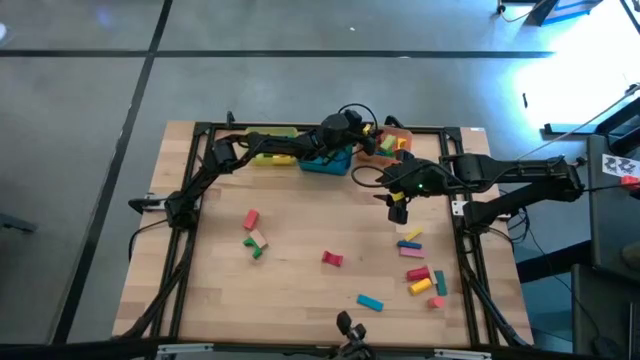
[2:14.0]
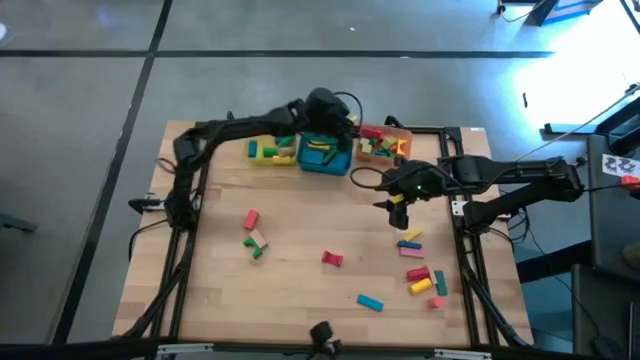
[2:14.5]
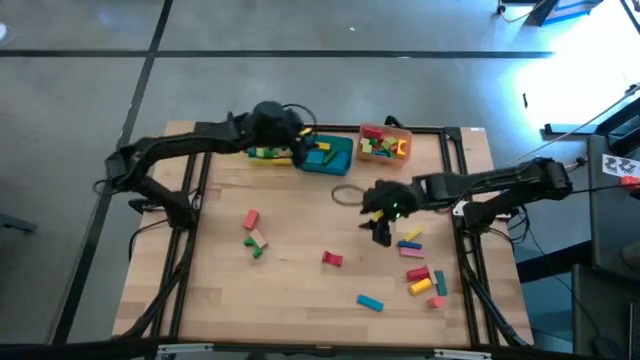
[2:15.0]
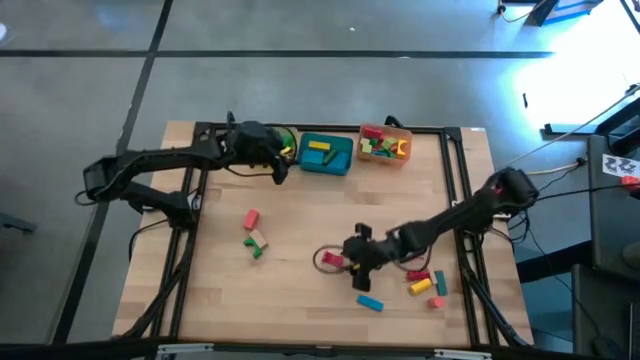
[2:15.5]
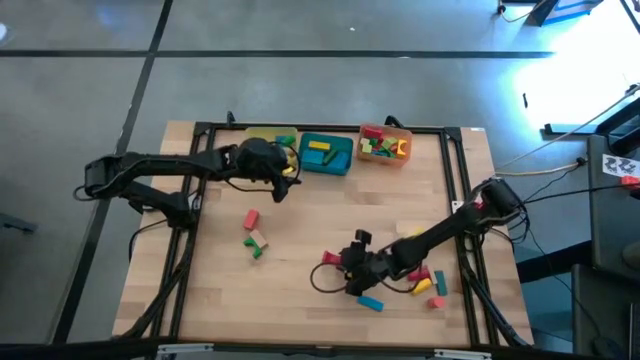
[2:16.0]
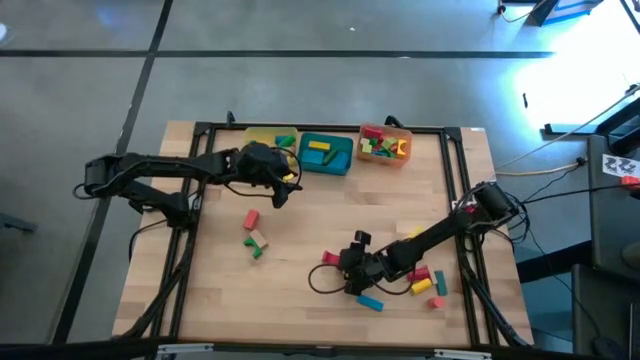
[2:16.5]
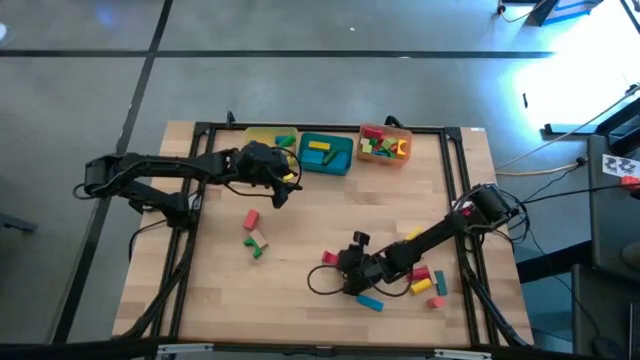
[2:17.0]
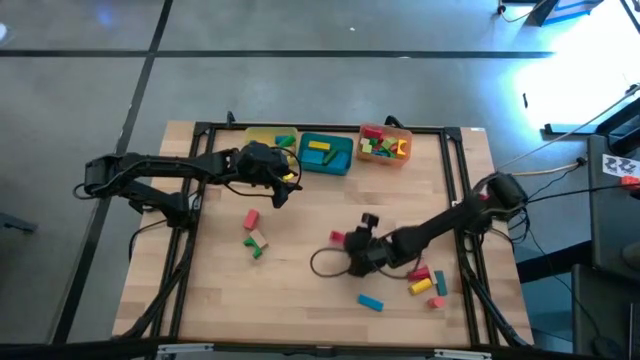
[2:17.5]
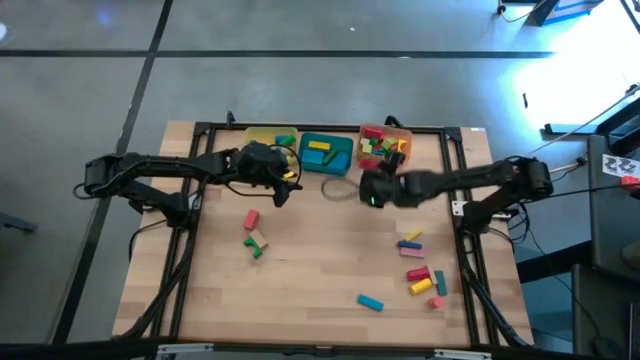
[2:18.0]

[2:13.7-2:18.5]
Task: Sort blocks by size
Put the red arch block into the orange bin

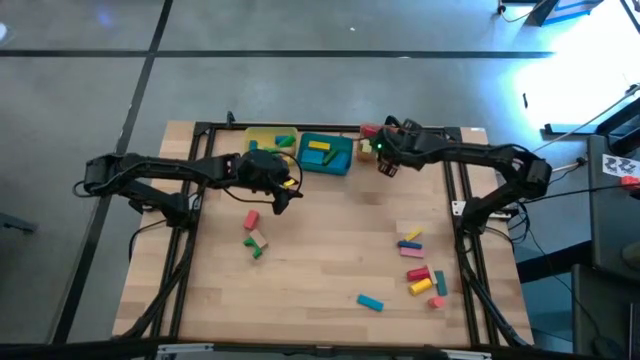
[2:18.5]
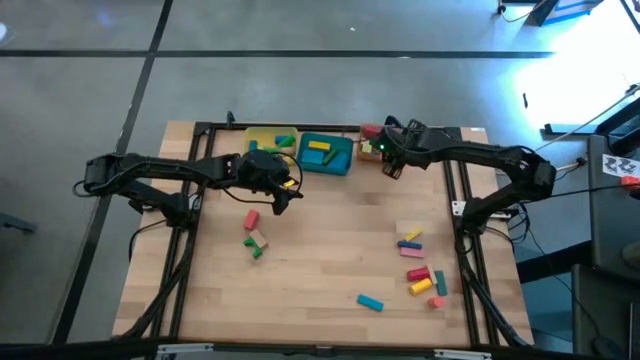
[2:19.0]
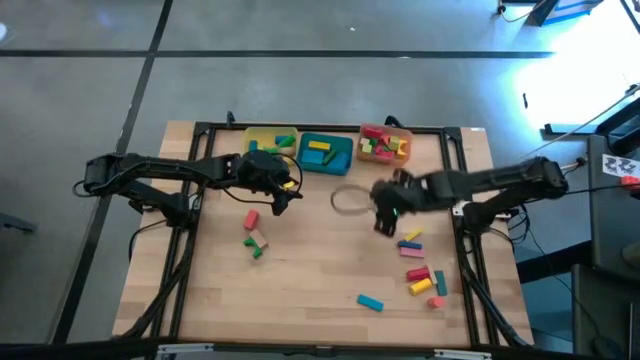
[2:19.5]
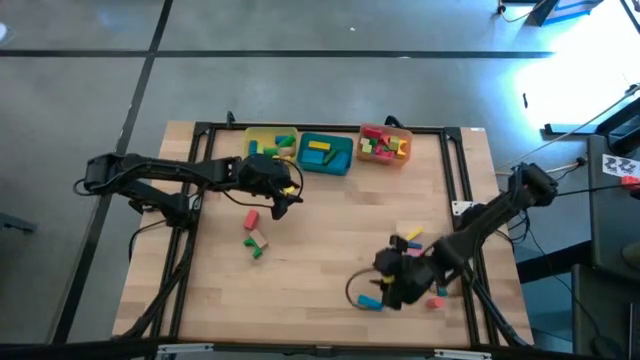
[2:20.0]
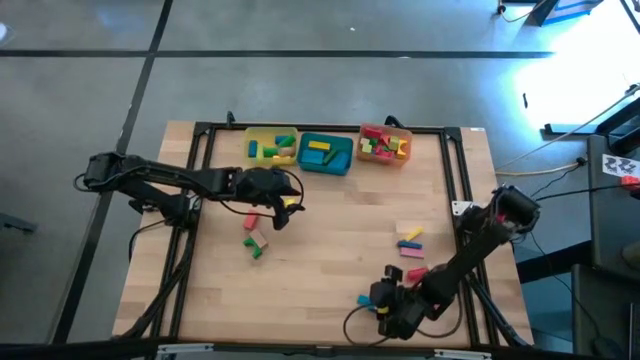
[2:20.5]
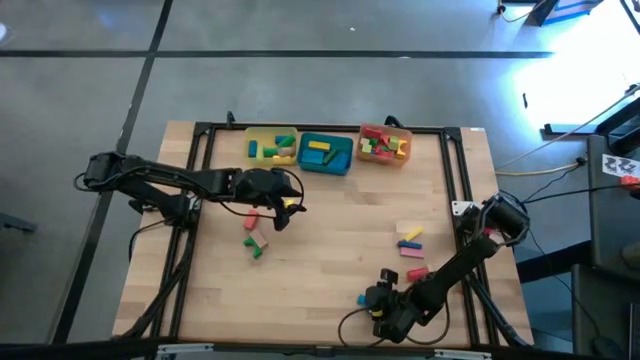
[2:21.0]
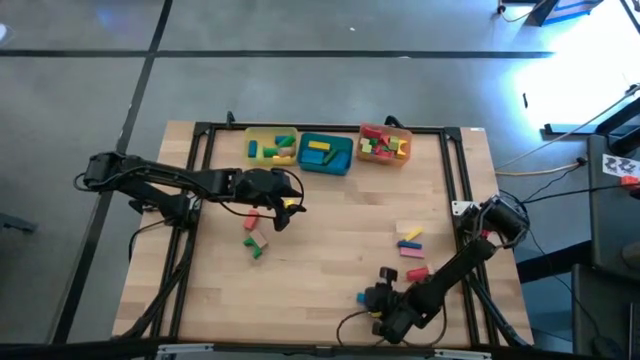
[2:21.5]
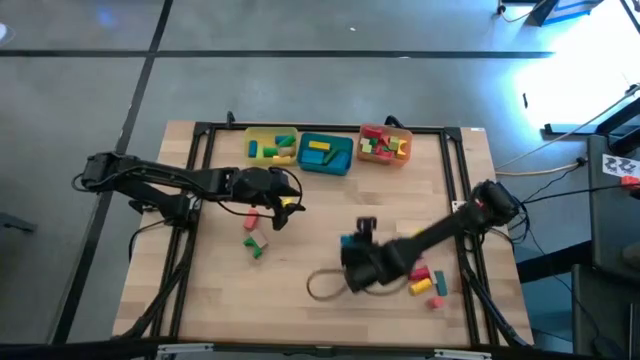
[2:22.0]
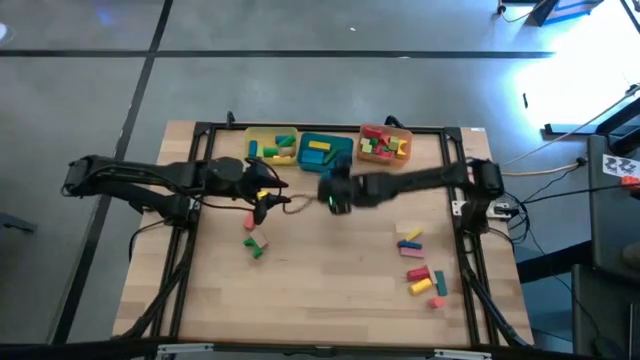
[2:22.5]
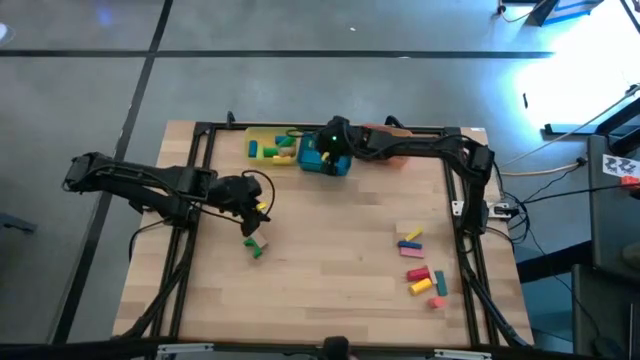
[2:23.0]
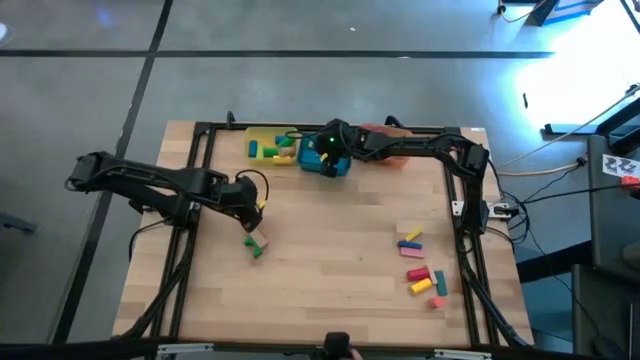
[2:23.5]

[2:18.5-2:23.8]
Put the blue rectangle block into the blue bin

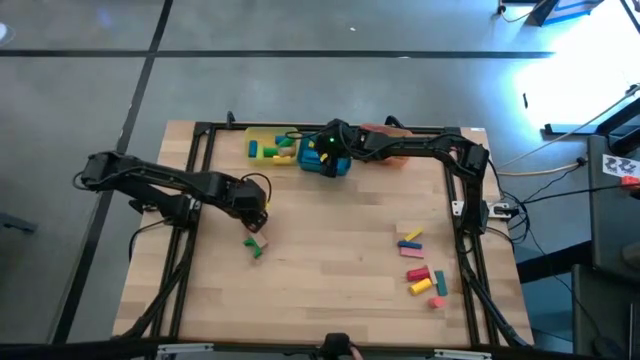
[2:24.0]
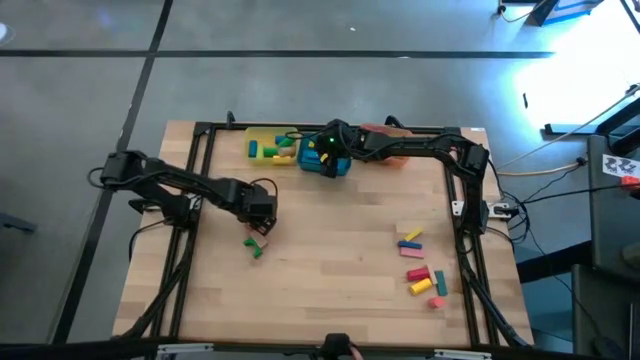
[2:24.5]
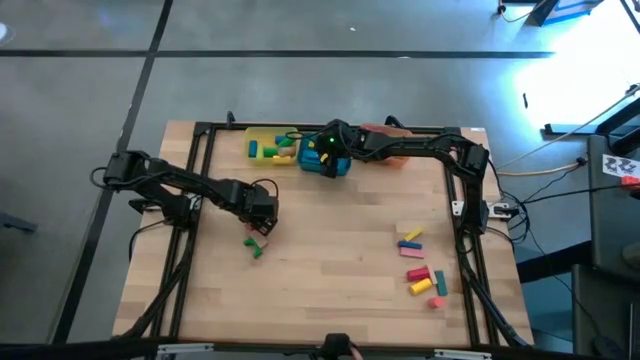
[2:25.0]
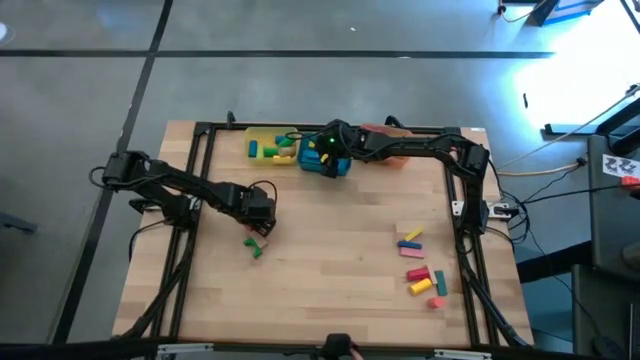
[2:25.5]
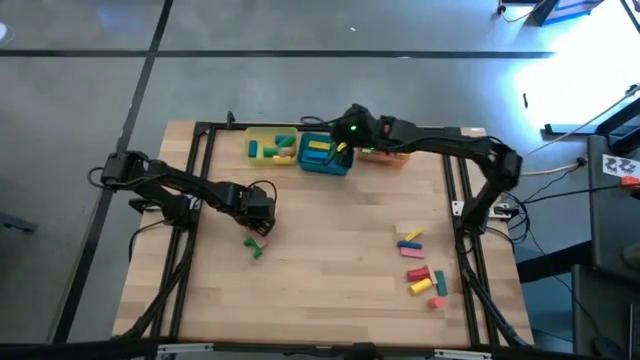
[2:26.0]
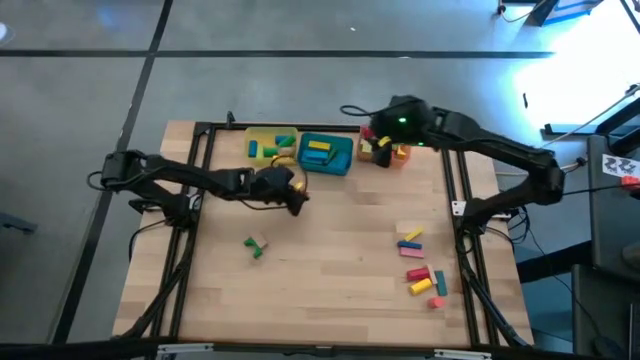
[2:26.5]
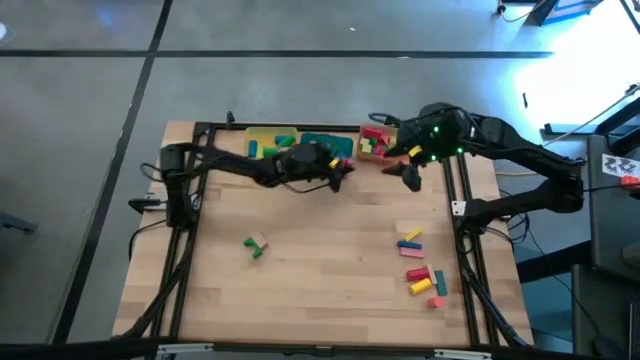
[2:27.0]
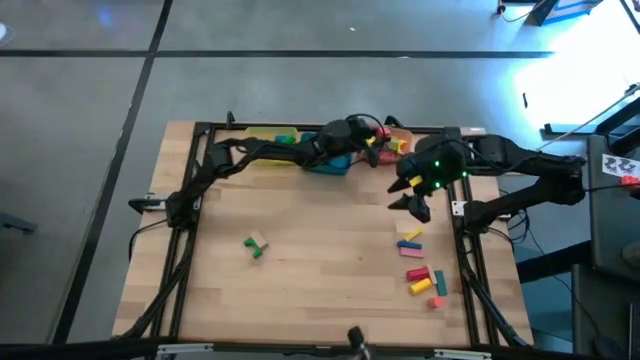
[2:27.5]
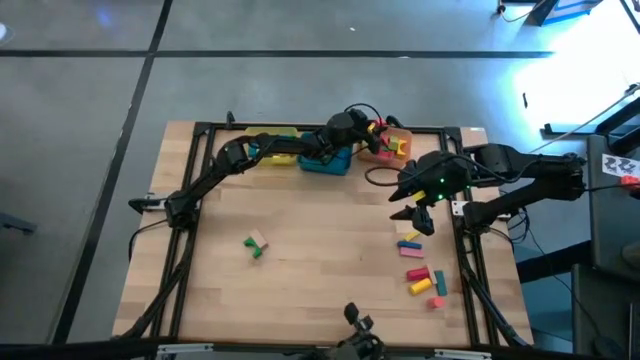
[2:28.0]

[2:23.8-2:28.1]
Put the orange arch block into the orange bin

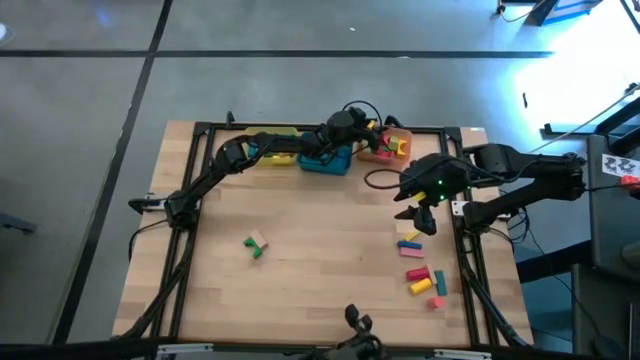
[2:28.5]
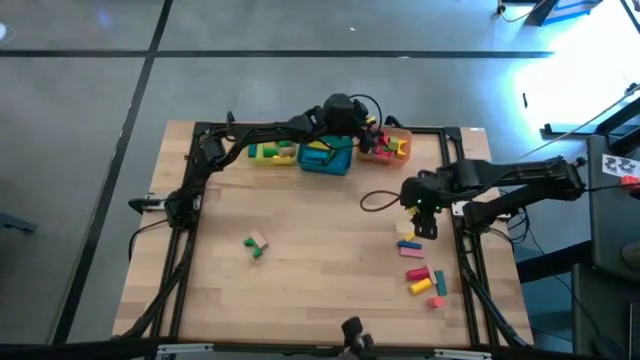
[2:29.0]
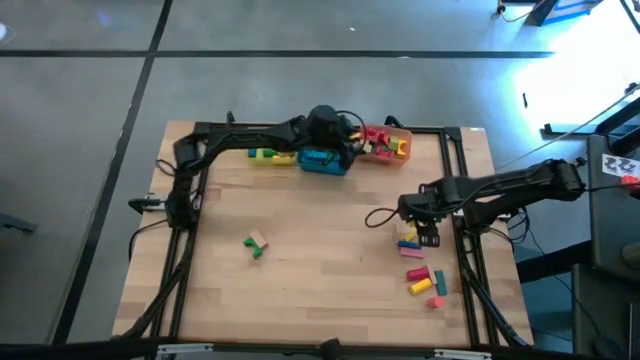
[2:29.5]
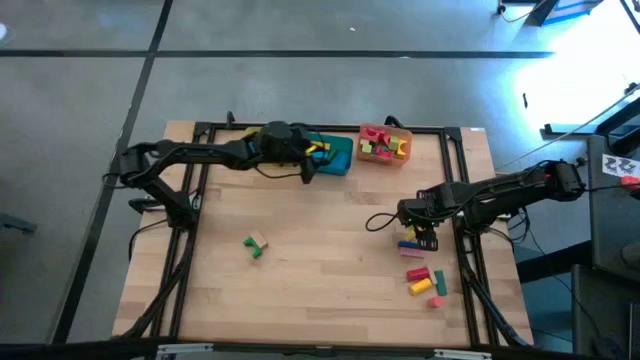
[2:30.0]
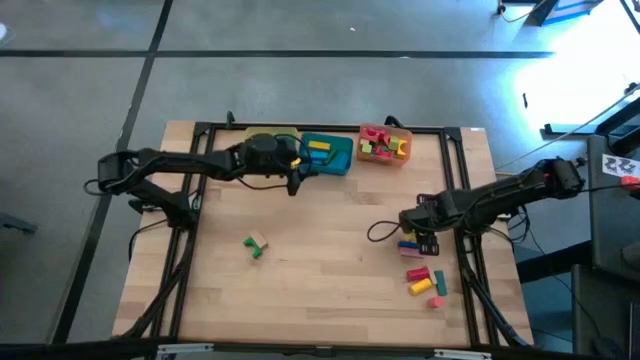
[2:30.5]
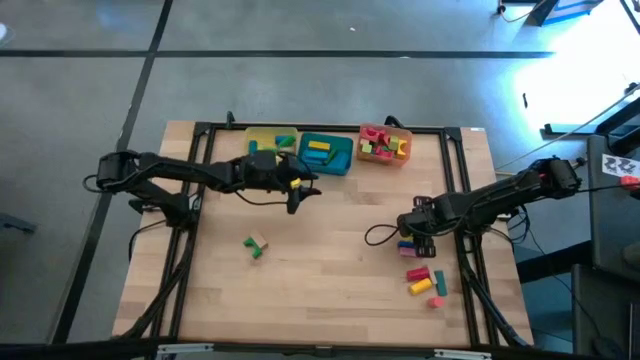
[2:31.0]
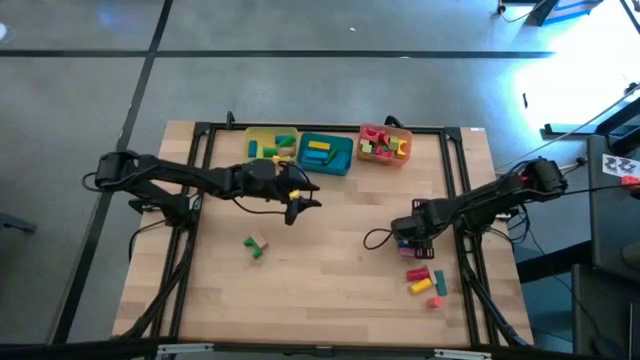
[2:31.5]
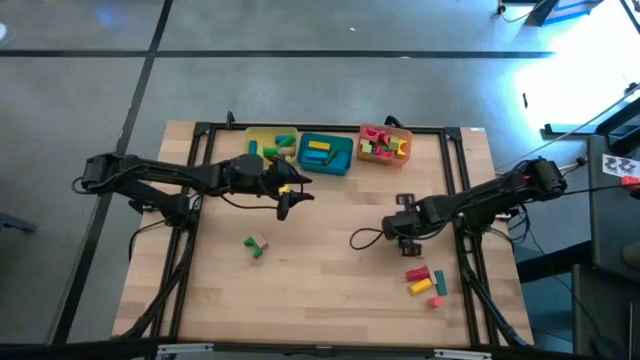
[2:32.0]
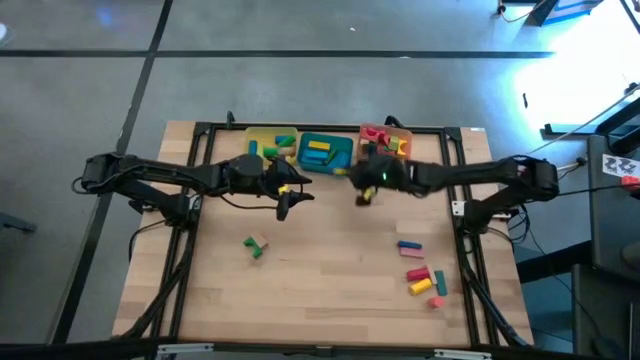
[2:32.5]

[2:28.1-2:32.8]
Put the yellow rectangle block into the blue bin

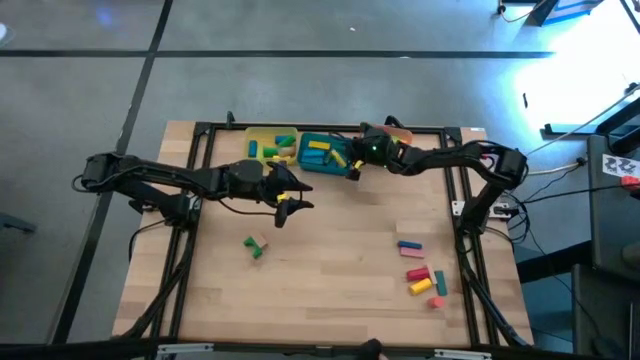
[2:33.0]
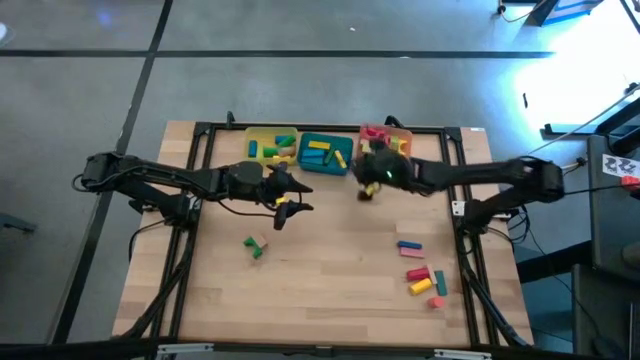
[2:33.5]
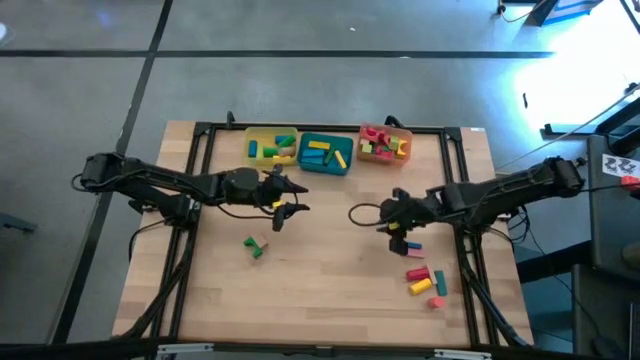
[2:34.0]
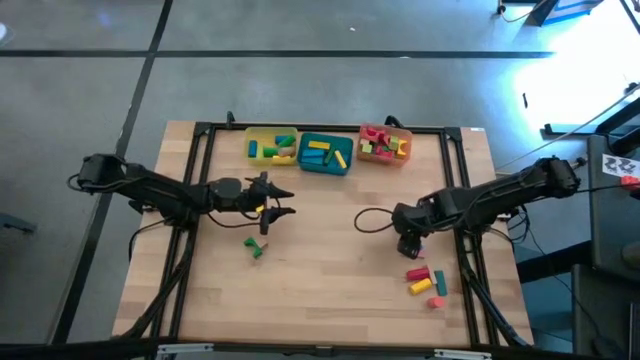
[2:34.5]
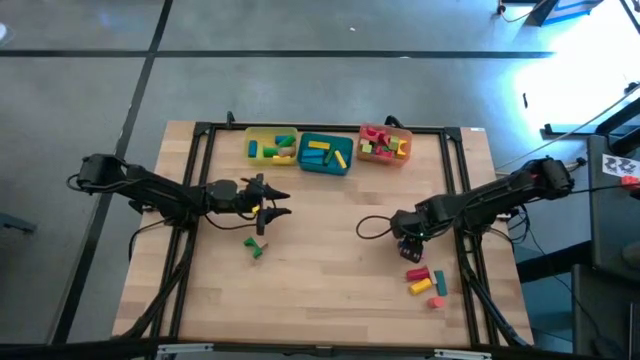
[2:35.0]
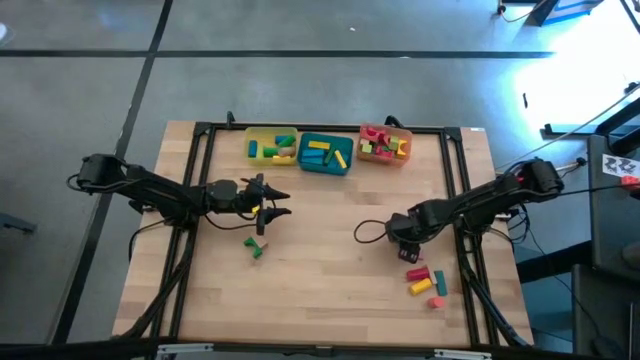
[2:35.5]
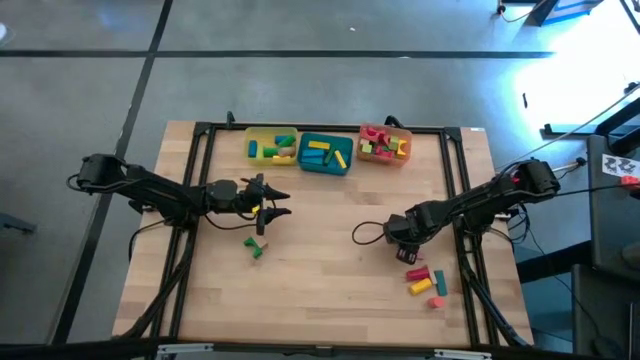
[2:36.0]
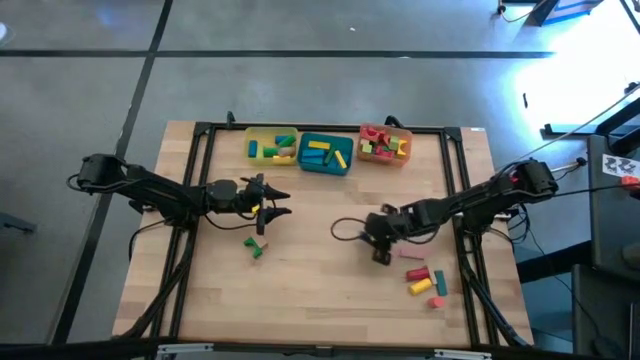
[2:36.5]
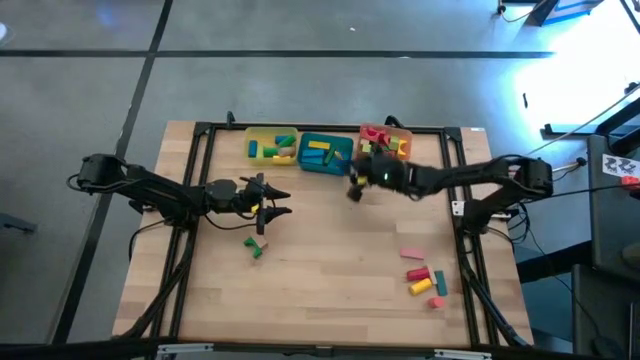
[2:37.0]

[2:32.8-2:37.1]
Put the blue rectangle block into the blue bin
